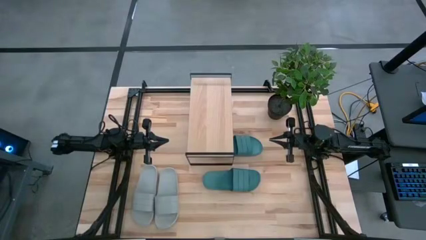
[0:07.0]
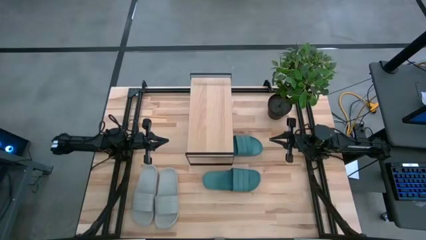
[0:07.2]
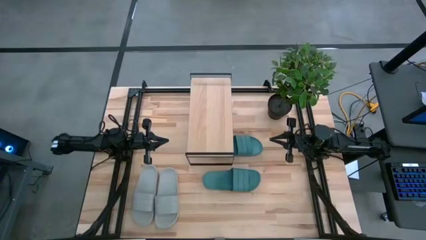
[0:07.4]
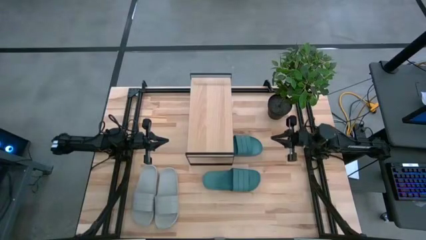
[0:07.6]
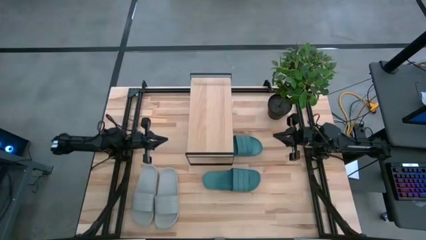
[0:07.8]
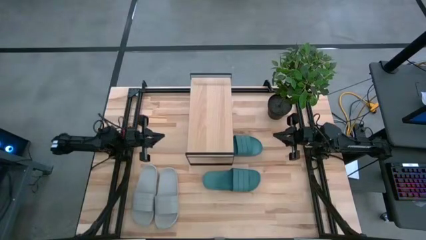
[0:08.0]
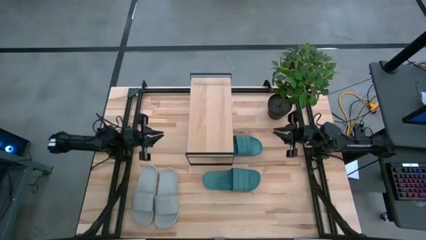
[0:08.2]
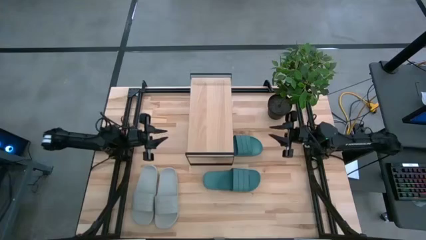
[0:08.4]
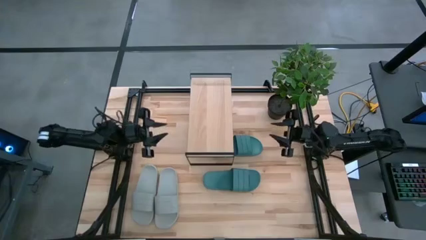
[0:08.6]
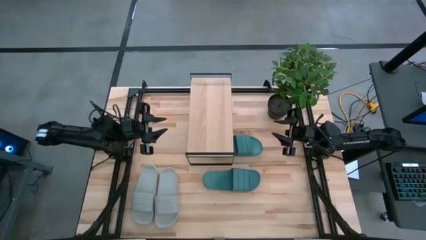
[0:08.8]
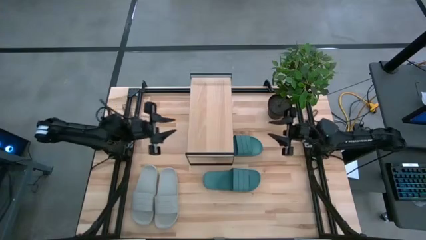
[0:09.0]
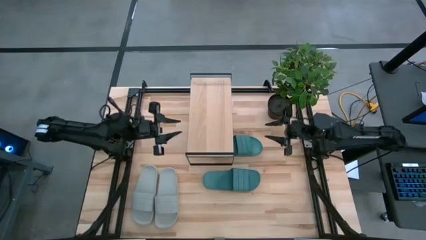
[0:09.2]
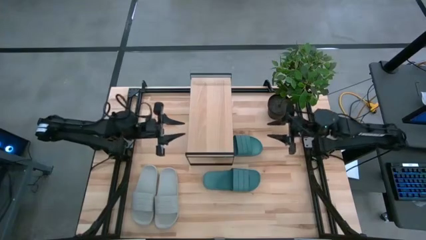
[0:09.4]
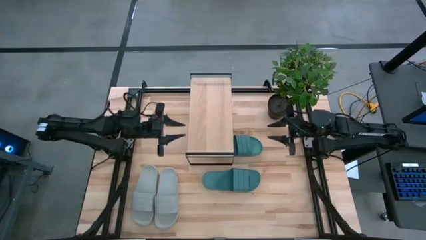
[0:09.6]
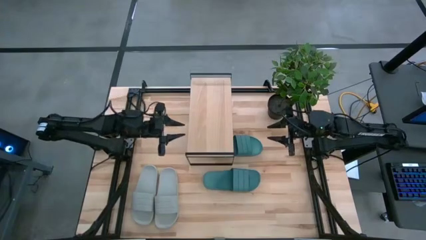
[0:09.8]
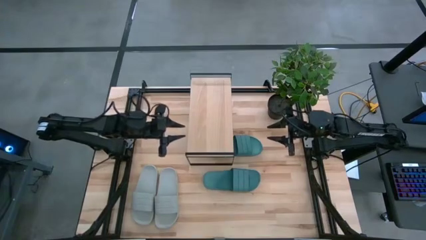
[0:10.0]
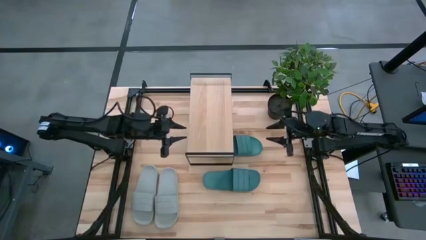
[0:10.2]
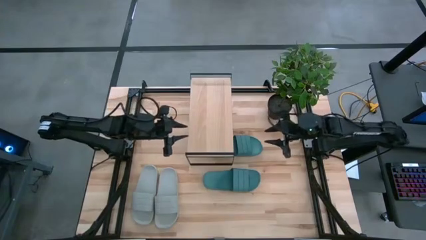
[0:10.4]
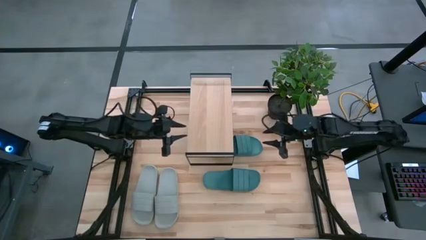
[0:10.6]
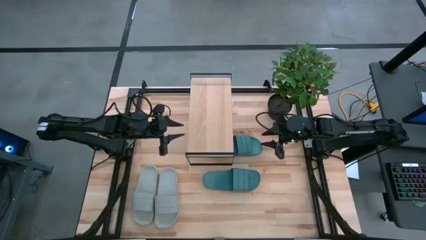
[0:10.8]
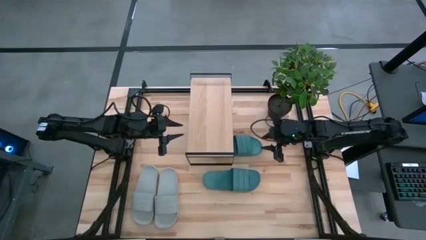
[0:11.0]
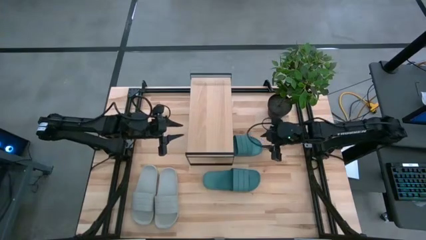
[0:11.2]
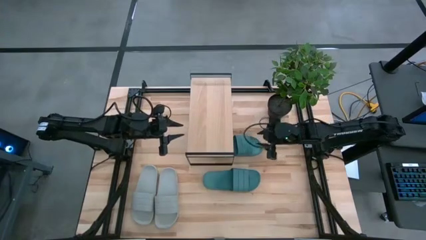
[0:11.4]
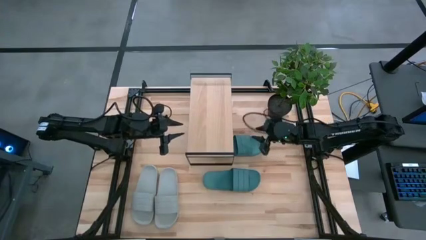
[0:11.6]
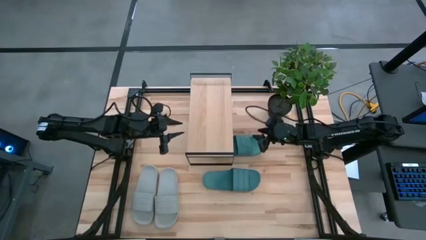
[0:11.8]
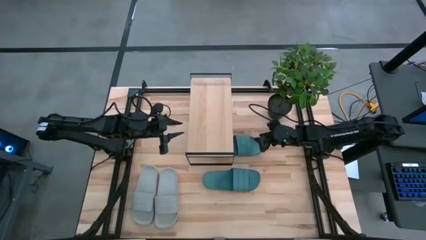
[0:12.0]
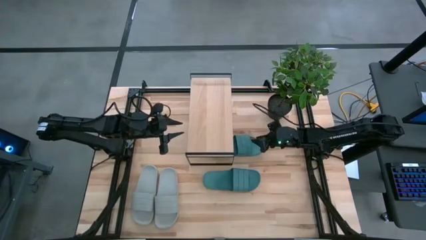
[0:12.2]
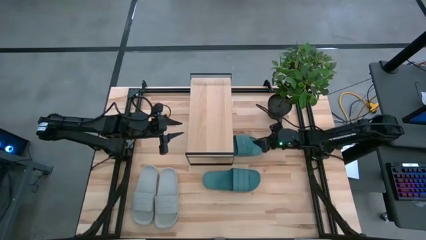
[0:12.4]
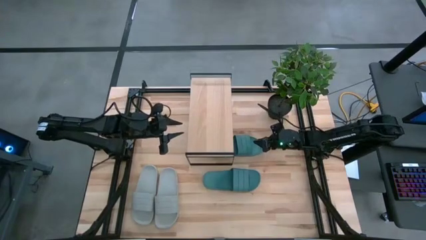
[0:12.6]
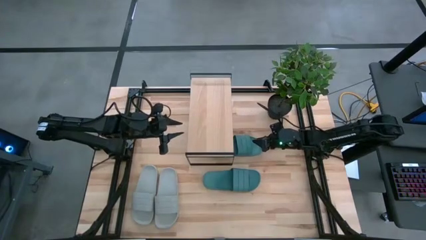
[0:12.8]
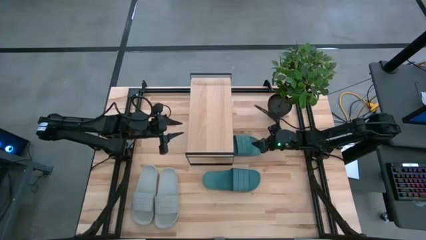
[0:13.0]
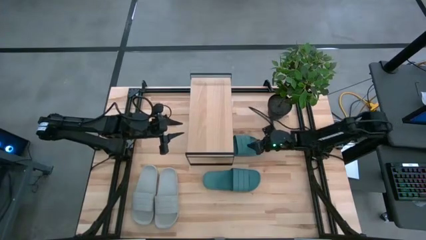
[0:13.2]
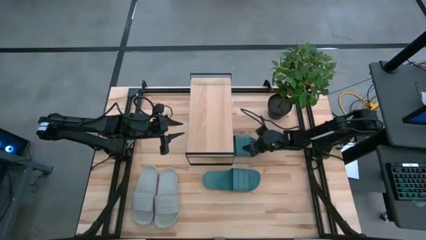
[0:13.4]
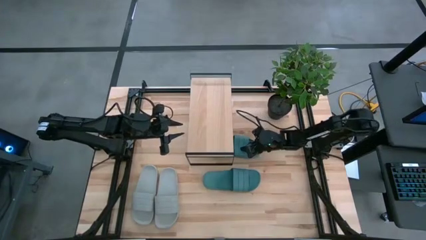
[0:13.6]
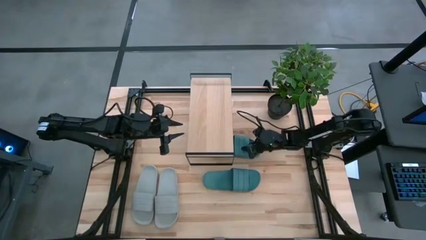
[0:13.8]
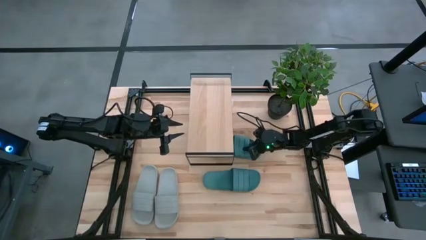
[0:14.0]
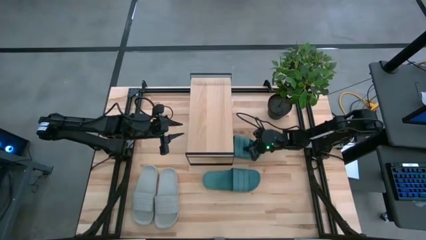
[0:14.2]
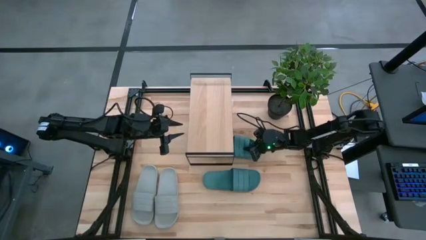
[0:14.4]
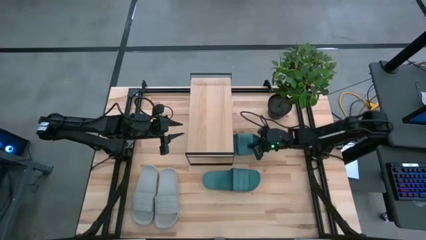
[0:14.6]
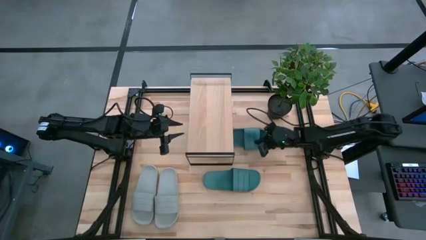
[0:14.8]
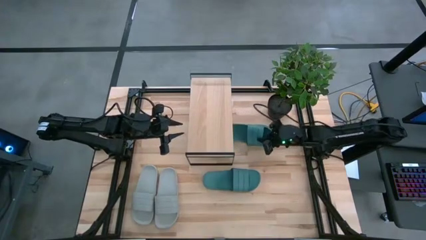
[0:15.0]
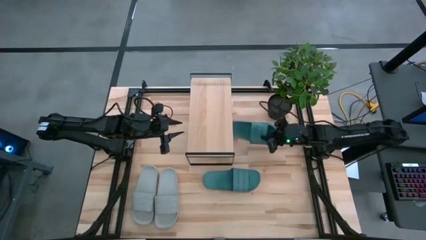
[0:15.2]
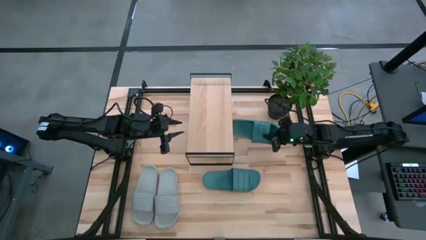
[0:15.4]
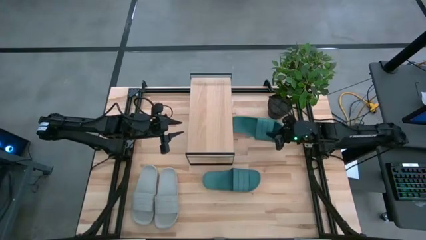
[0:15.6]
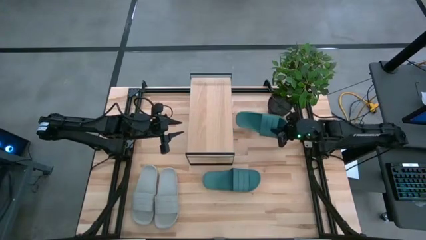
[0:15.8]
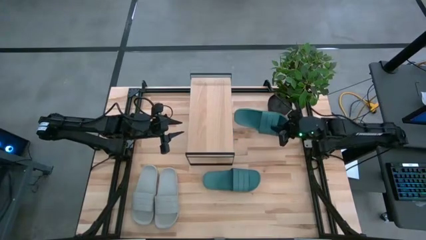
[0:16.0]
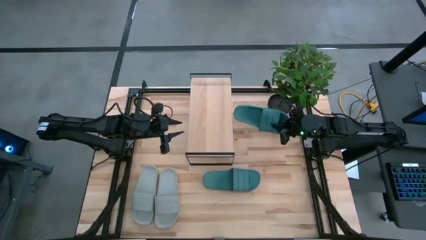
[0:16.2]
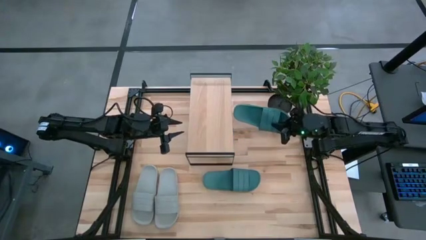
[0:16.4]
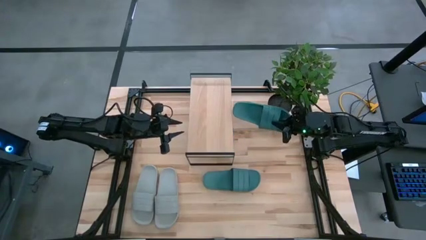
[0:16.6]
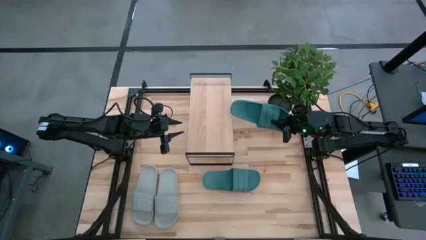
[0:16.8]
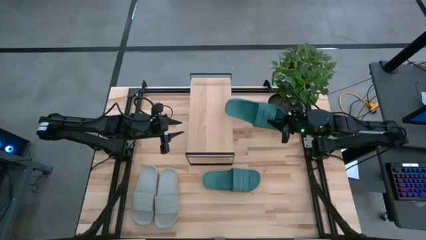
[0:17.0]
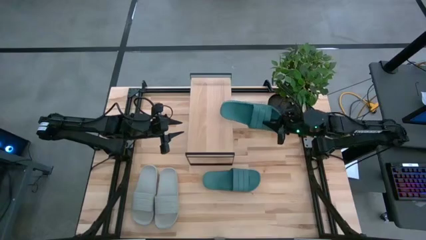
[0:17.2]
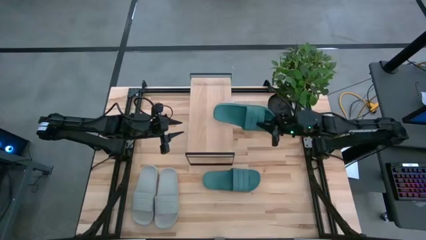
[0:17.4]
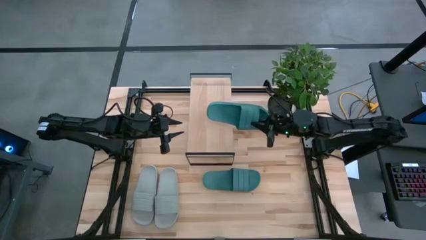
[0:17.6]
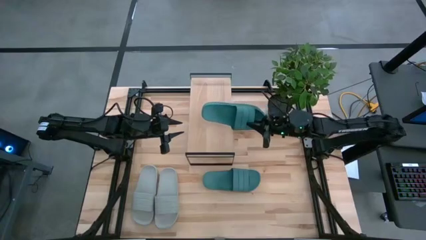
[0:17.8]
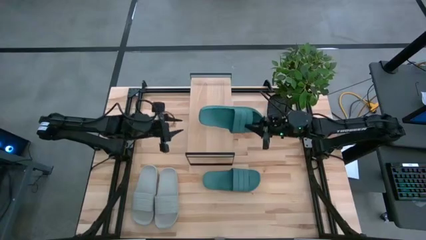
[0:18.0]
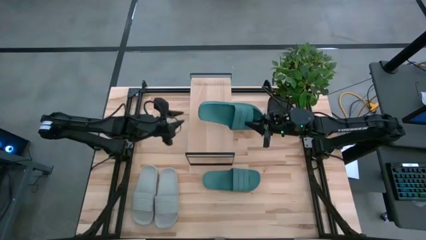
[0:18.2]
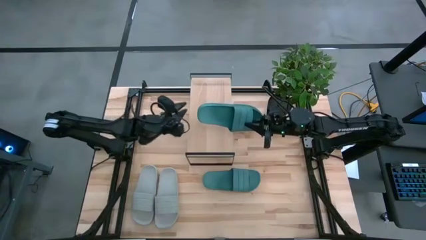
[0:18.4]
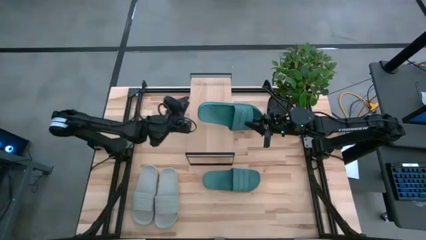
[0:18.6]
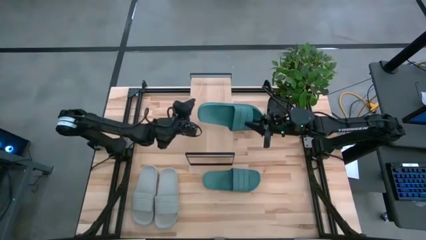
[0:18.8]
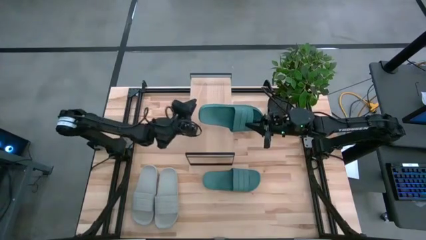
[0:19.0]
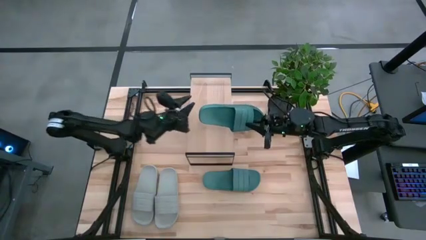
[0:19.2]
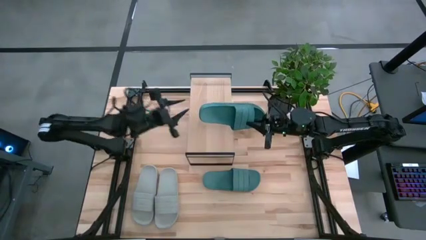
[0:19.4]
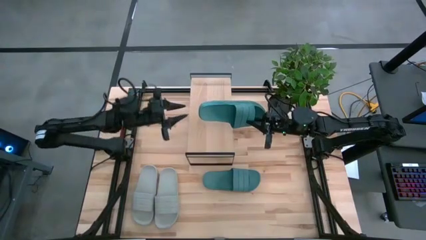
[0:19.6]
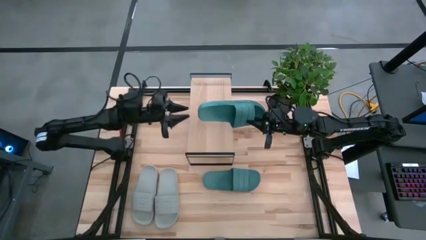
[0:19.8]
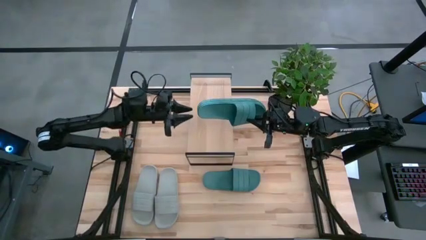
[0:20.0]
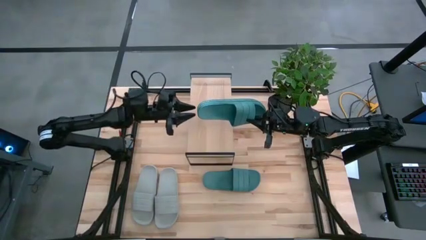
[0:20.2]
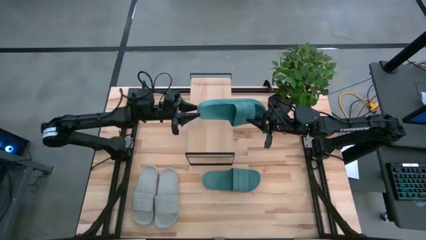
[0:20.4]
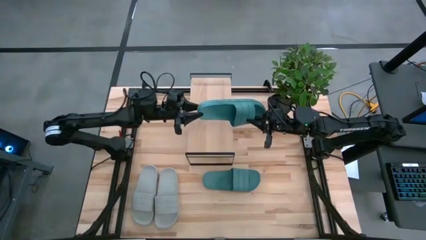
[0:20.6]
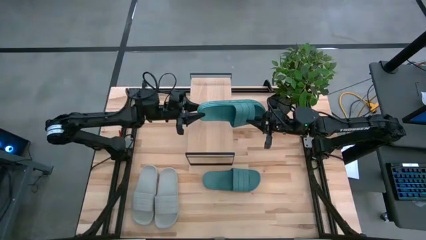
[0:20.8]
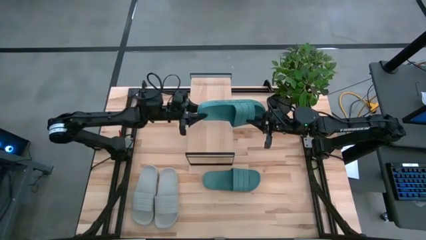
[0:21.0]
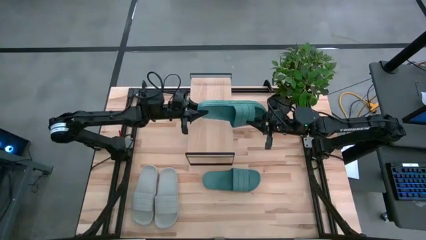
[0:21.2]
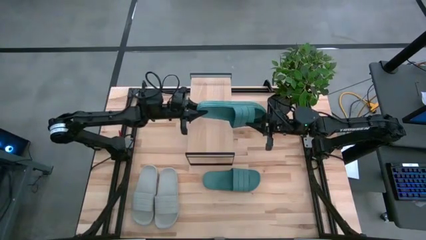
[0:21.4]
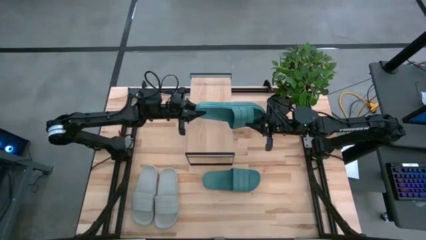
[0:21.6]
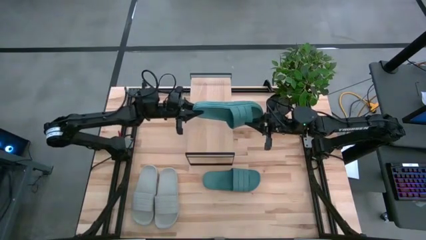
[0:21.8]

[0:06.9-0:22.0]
Task: Pick and place slides into the shelf
Put the top green slide on the shelf
